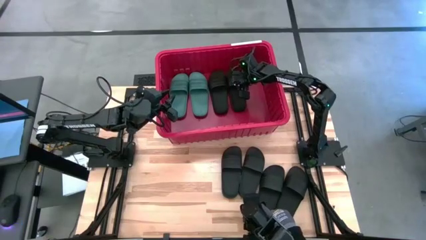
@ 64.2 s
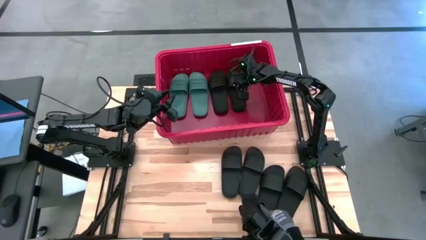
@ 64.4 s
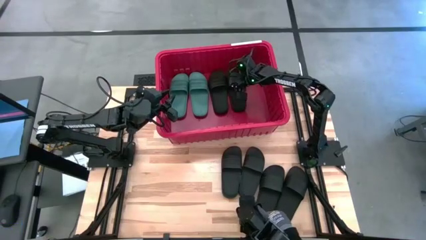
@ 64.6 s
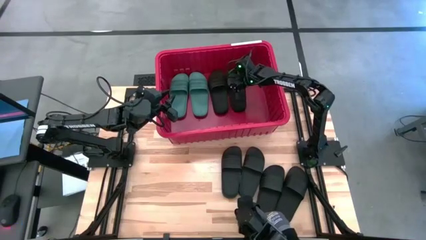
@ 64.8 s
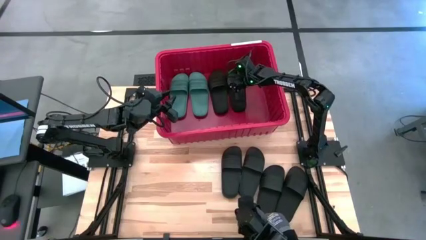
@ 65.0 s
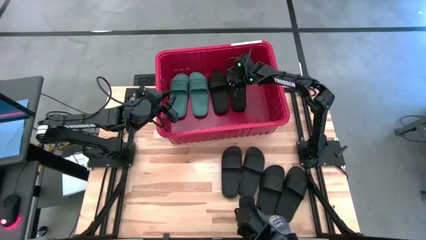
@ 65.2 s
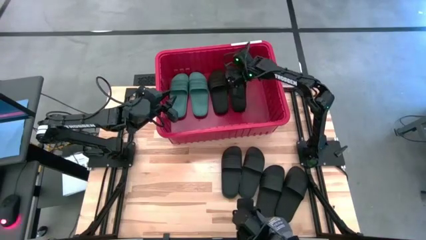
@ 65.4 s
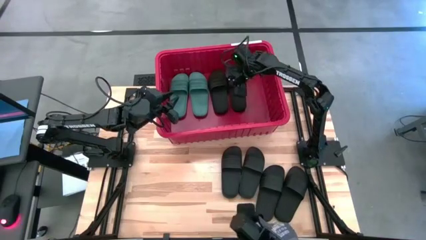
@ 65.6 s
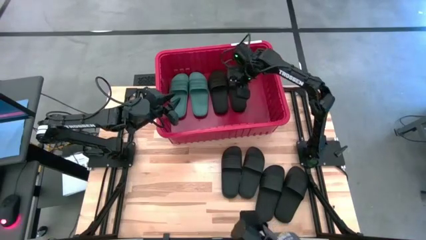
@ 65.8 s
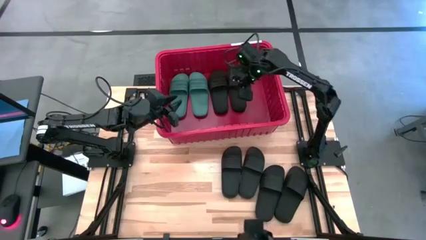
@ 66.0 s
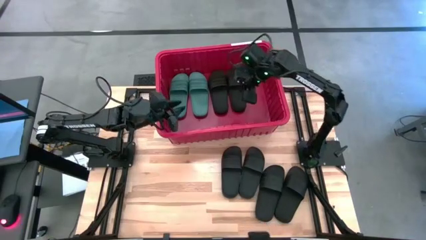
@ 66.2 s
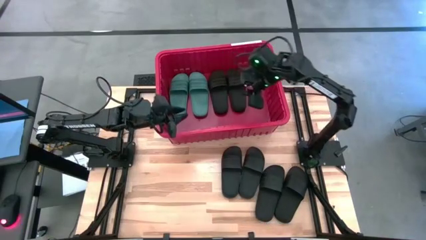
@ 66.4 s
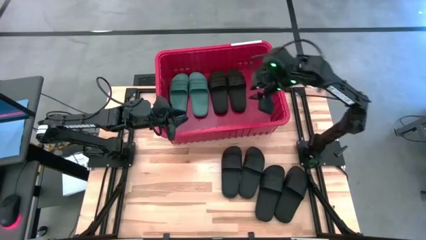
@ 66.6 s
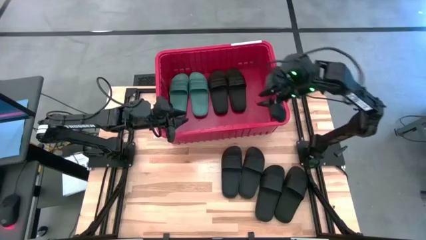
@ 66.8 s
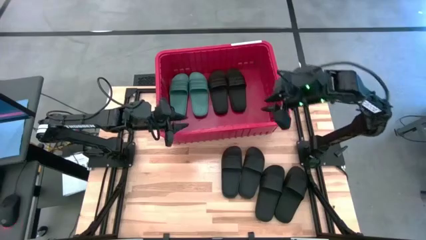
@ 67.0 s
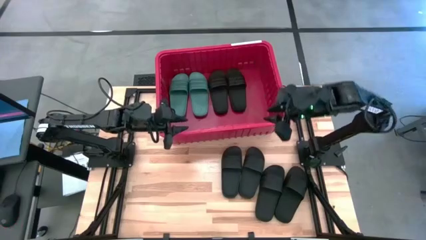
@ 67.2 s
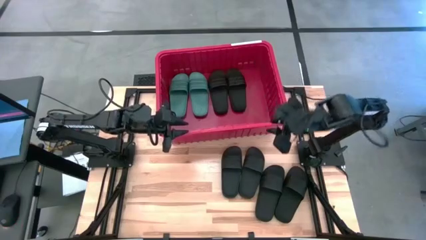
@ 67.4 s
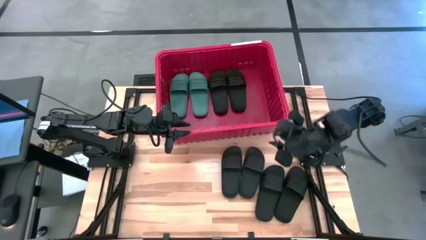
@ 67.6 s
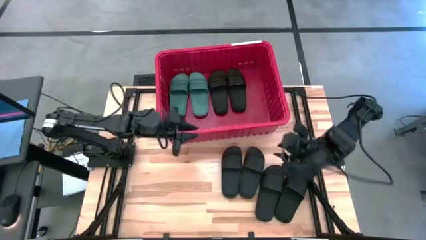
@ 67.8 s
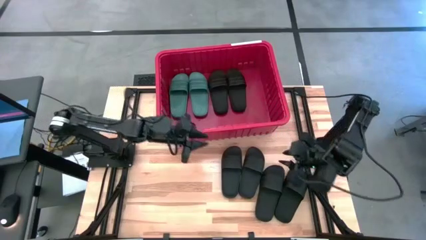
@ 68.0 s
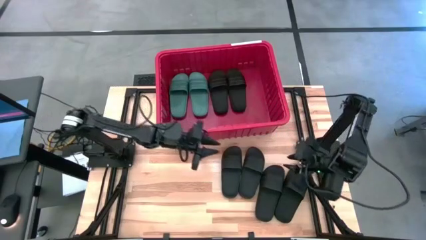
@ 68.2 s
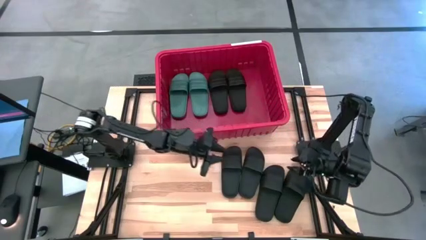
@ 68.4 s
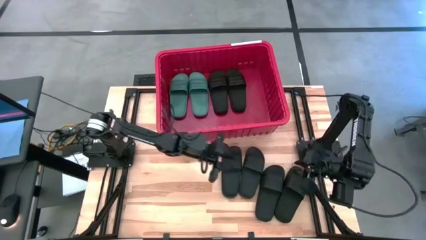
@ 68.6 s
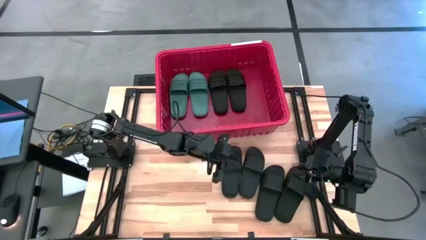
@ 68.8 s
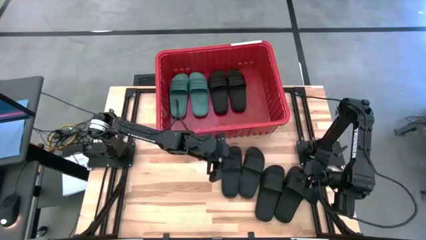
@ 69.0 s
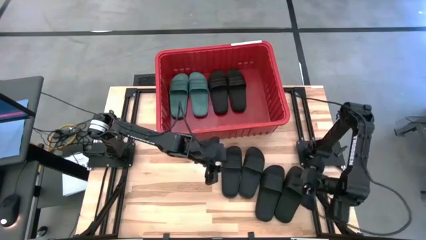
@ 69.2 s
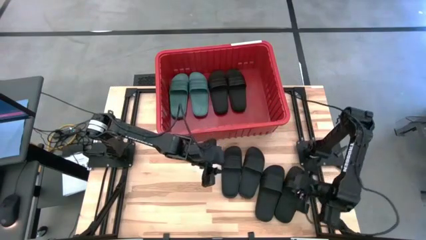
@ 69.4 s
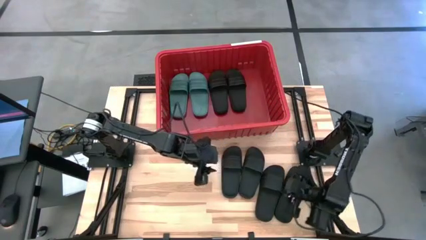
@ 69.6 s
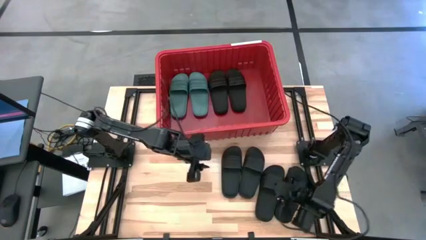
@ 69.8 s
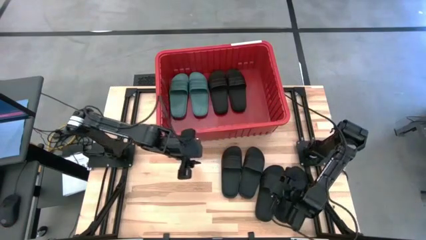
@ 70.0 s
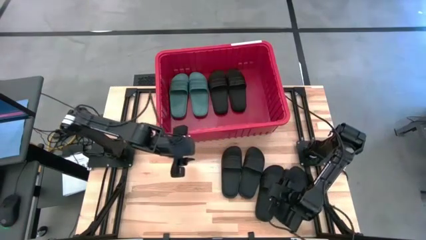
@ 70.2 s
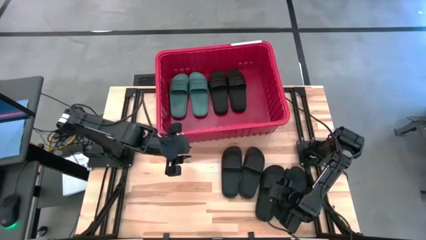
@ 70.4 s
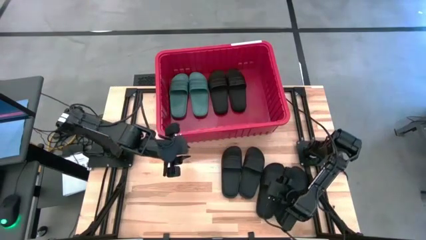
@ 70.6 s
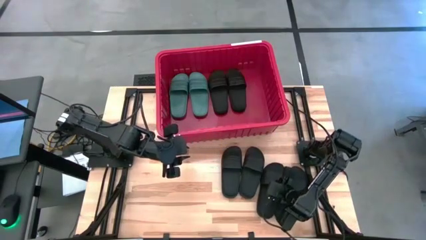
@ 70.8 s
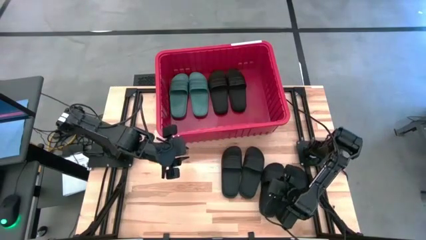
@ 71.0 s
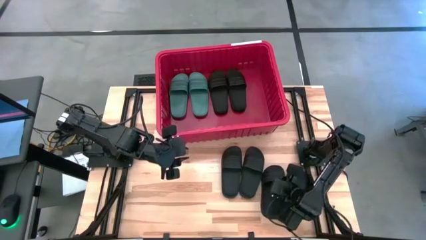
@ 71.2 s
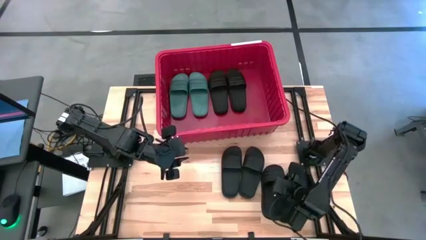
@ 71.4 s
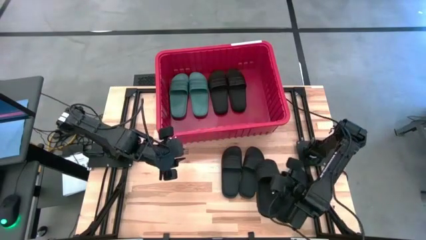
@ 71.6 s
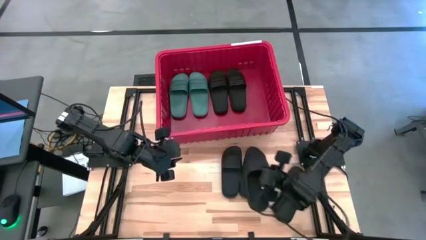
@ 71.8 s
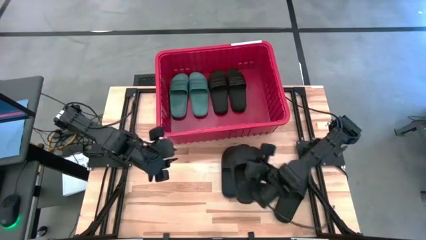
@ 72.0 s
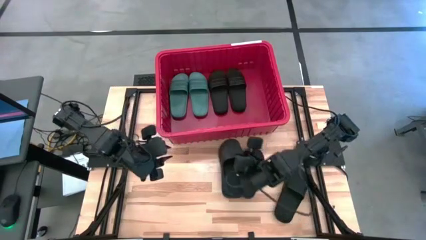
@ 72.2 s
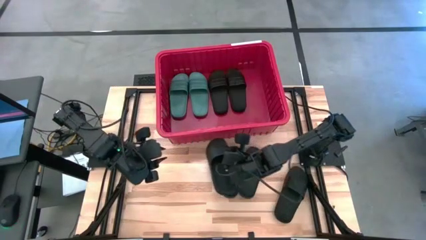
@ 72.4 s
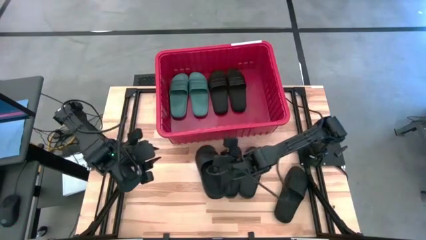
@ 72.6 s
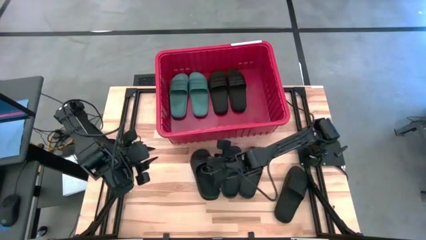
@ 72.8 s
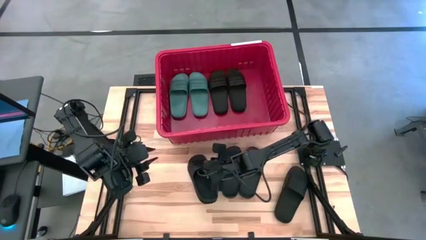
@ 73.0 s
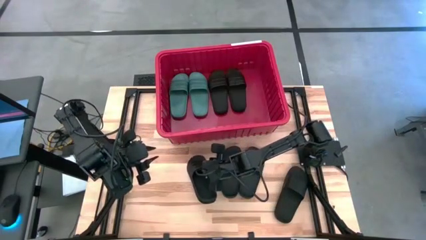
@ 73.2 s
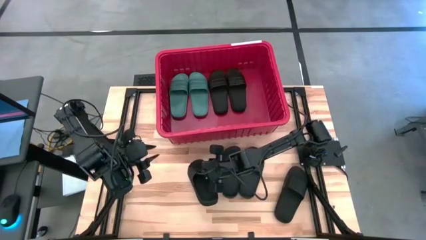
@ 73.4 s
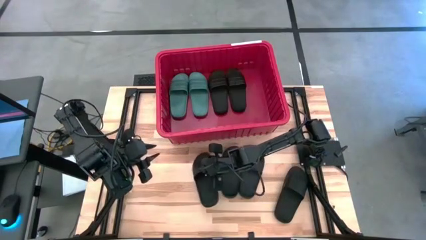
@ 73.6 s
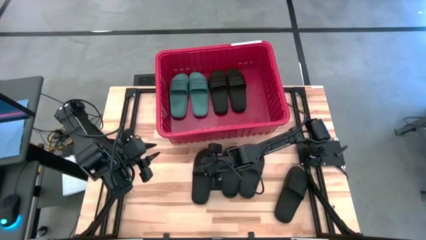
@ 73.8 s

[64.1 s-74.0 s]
Task: Pick and place slides into bin
Put the black slipper into the red container
